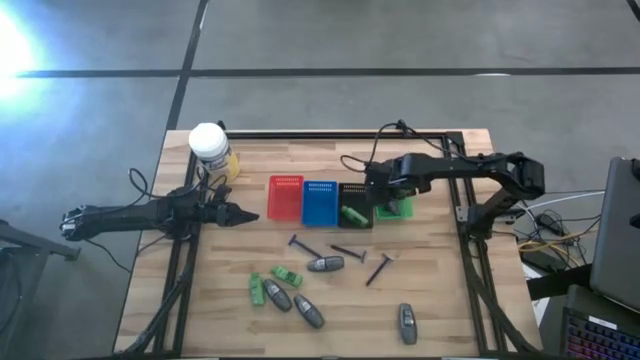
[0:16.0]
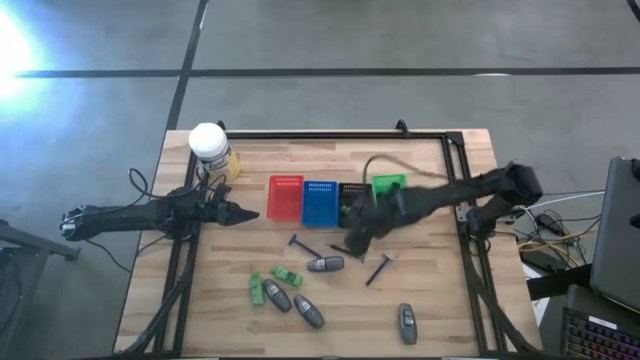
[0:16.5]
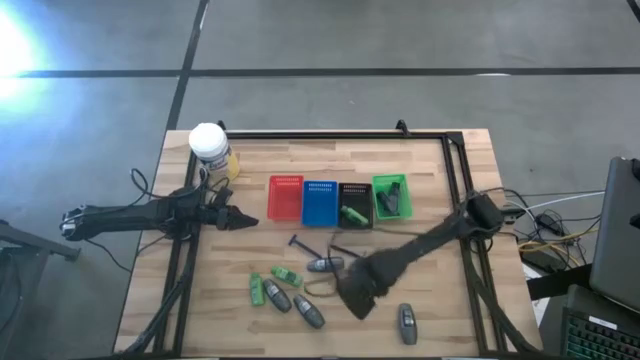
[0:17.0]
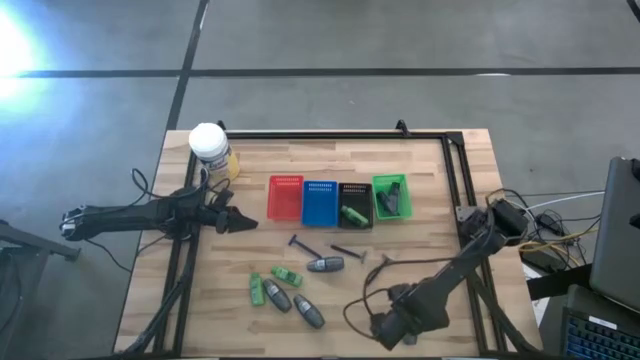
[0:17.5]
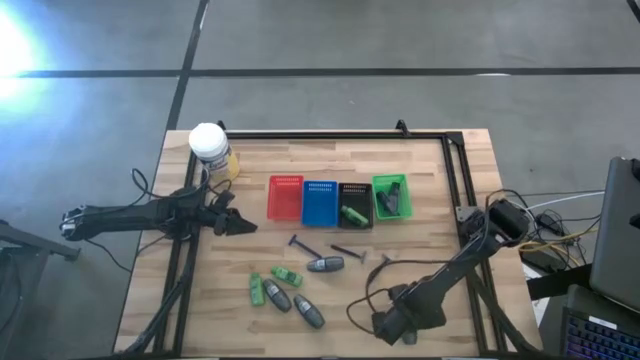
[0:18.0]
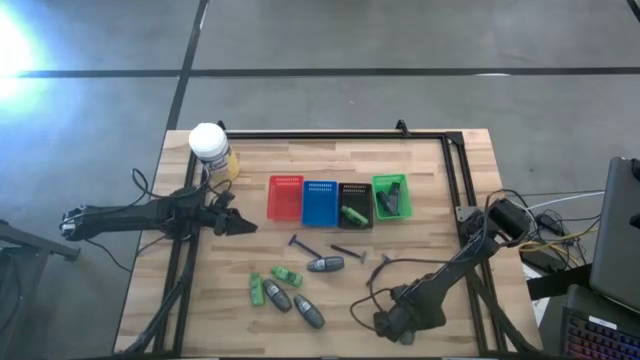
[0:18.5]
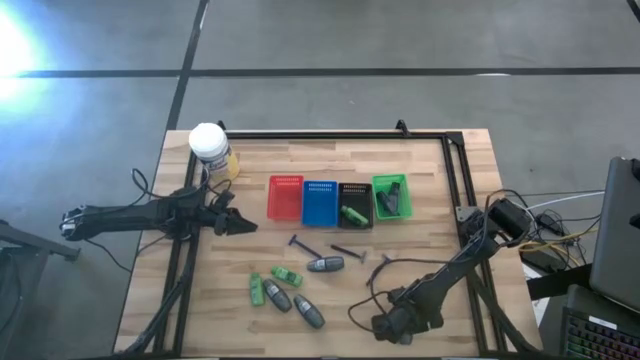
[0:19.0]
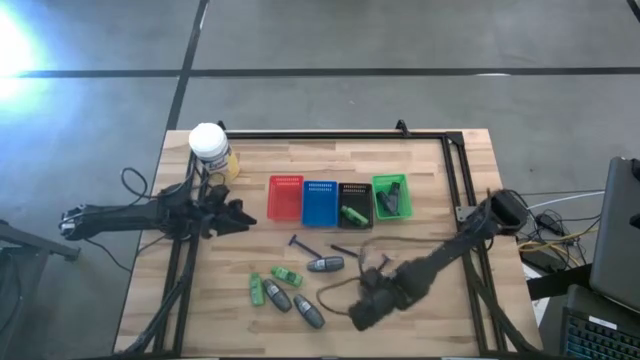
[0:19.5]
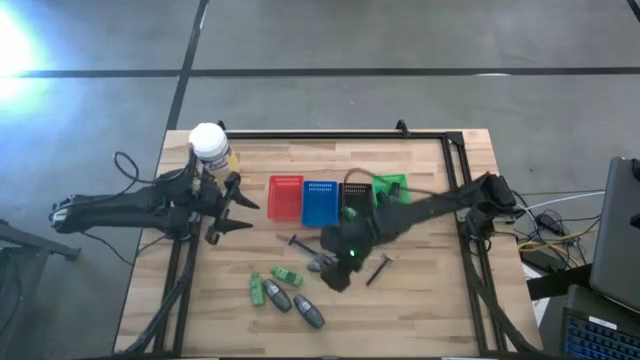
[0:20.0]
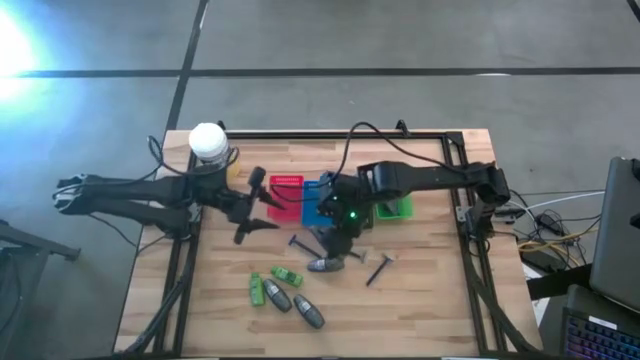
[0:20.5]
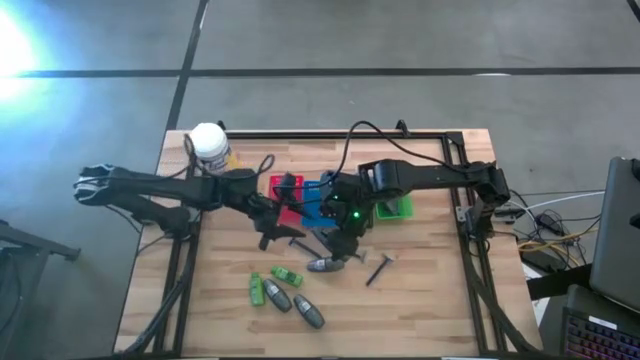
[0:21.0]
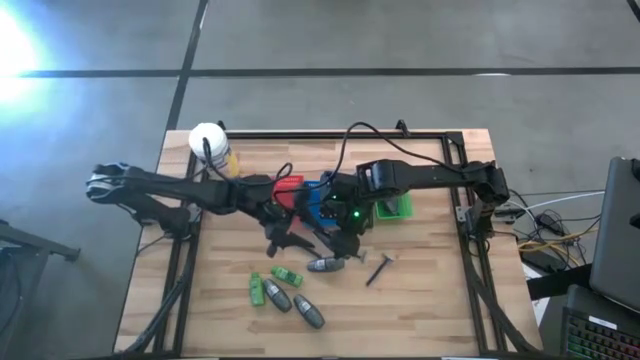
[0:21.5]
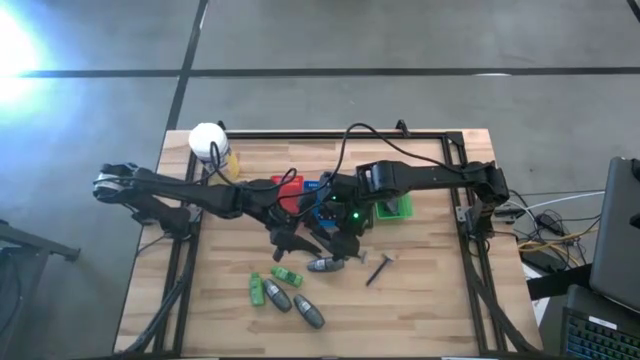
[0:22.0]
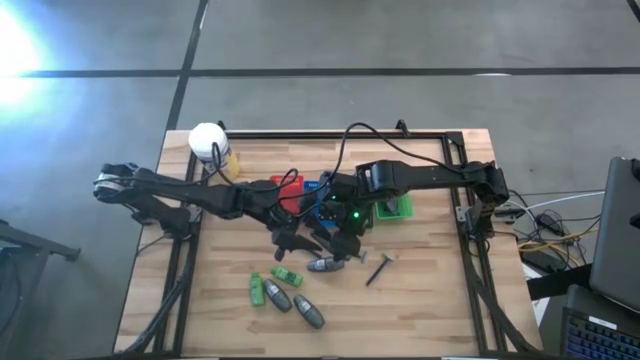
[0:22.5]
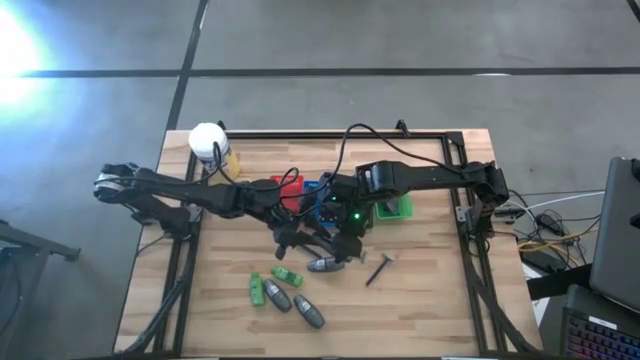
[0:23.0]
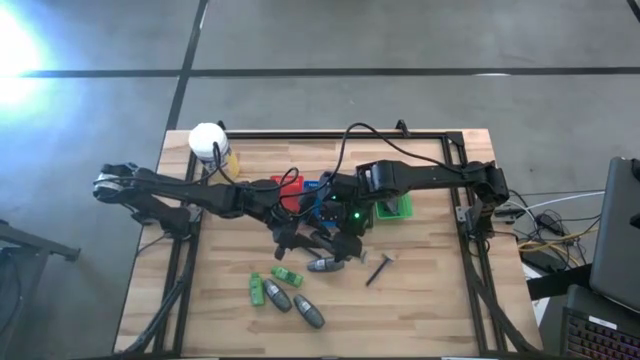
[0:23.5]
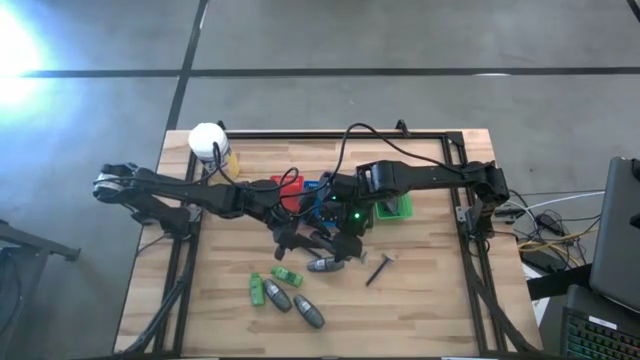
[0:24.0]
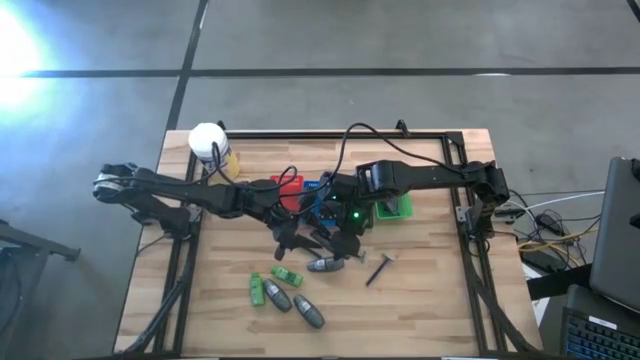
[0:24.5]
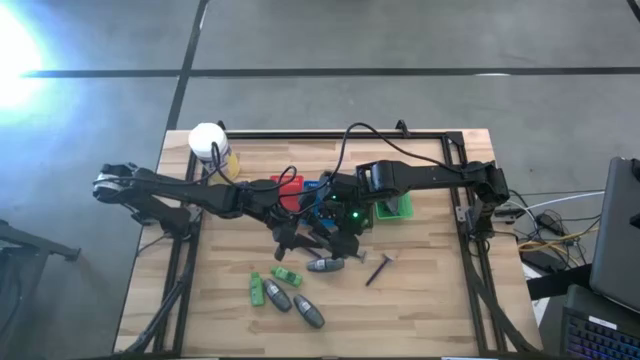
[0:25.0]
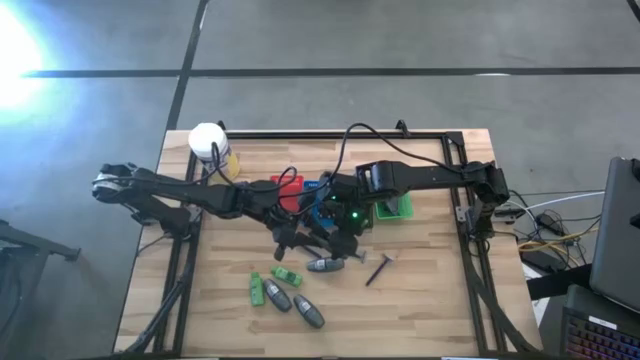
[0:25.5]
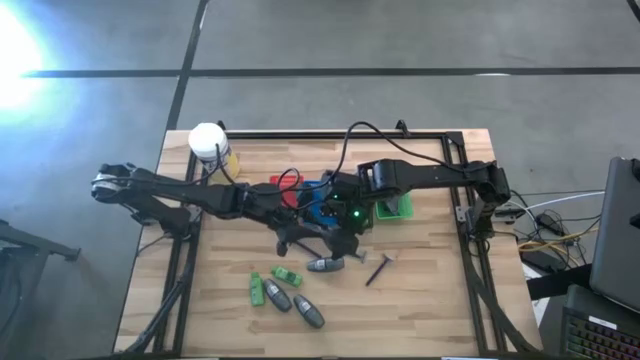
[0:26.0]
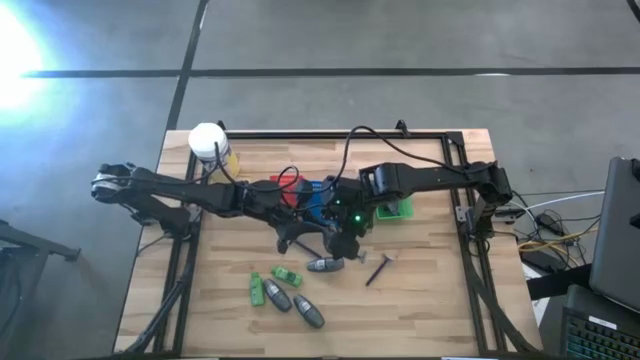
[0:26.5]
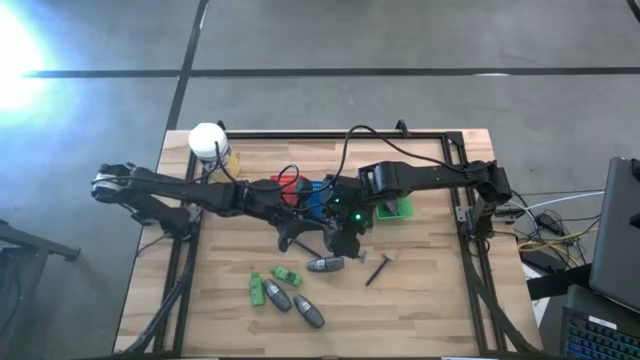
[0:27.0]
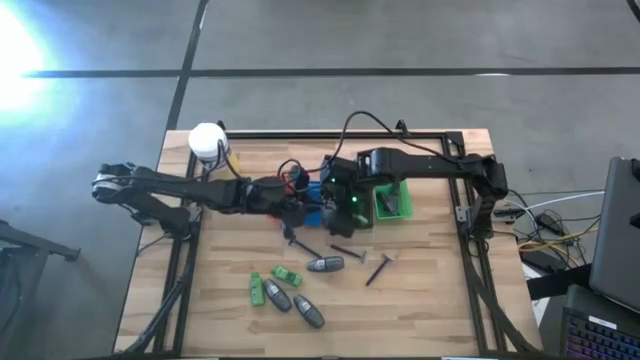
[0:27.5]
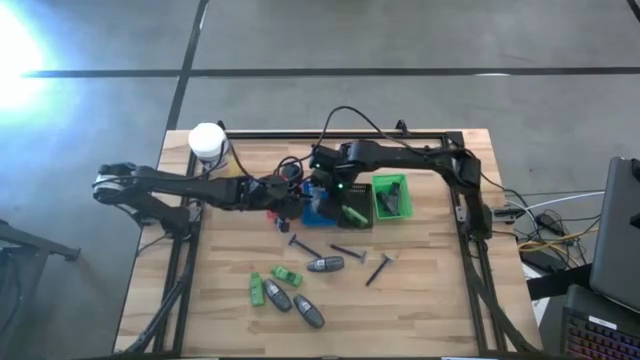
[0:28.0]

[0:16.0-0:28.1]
Task: Pick & Place Travel size toiletries
Put the black deodorant into the blue basket

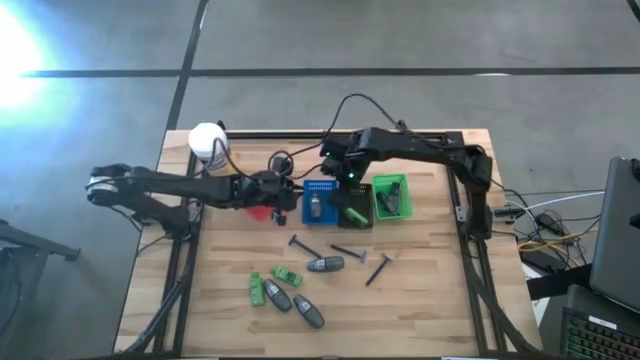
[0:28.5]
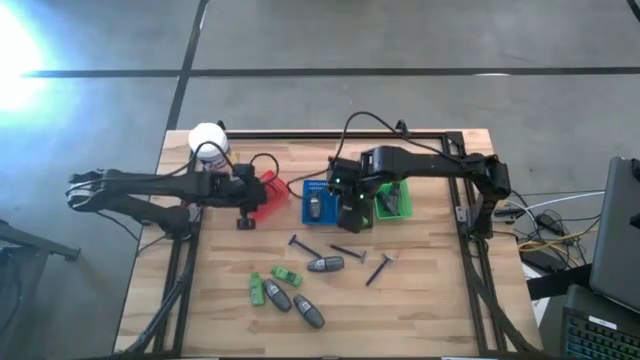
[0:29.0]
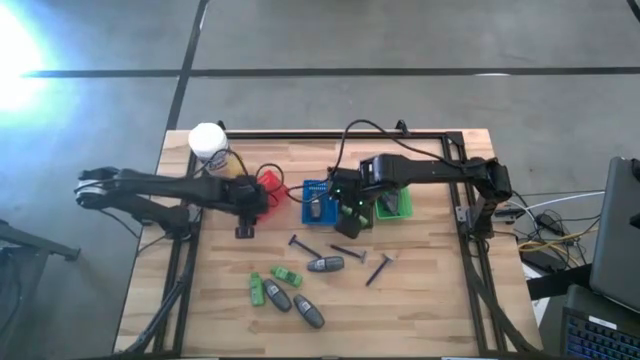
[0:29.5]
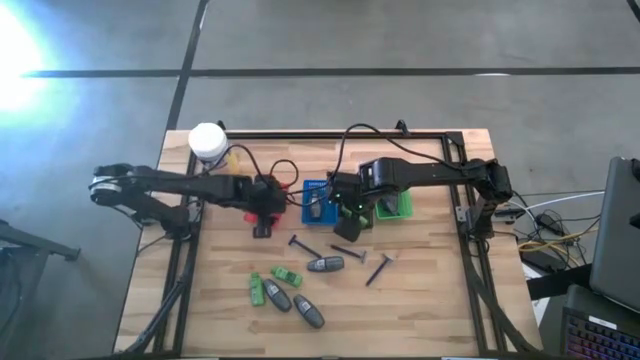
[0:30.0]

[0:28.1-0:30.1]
Adjust the red basket

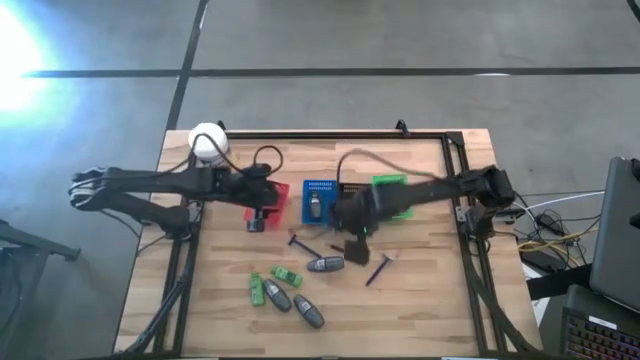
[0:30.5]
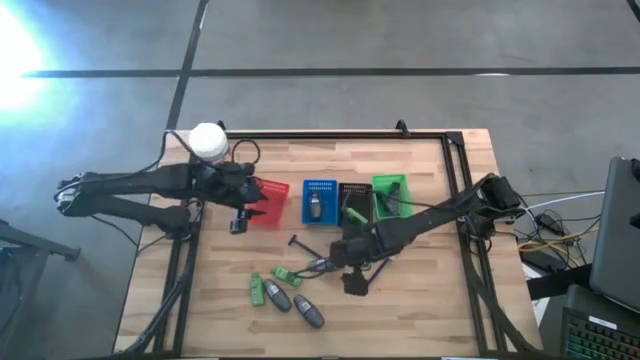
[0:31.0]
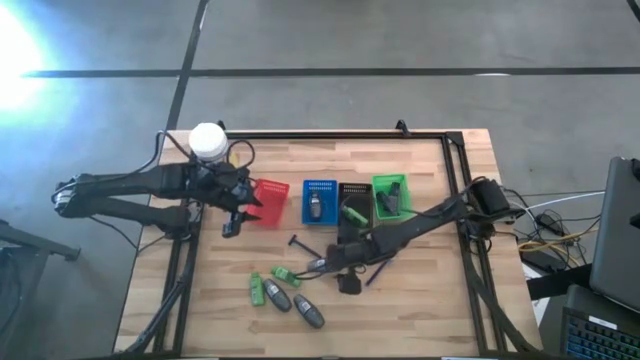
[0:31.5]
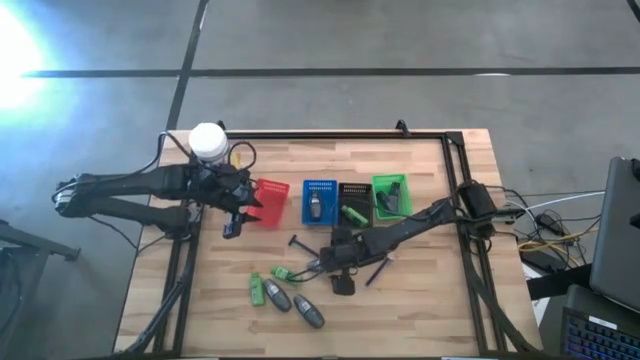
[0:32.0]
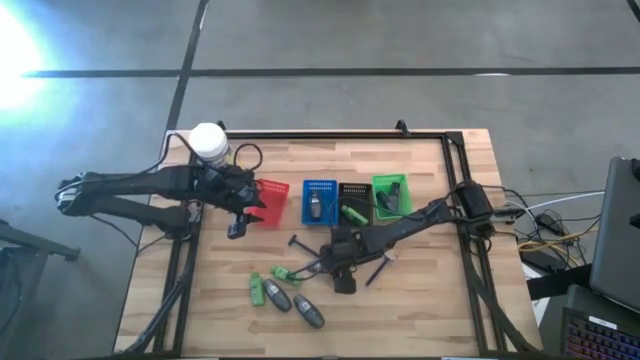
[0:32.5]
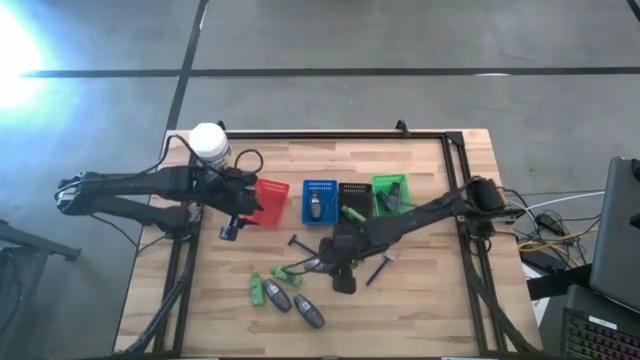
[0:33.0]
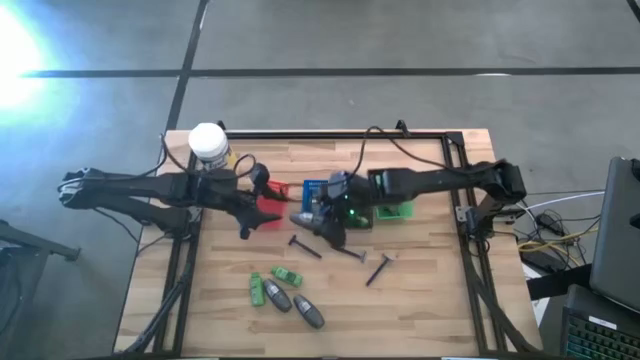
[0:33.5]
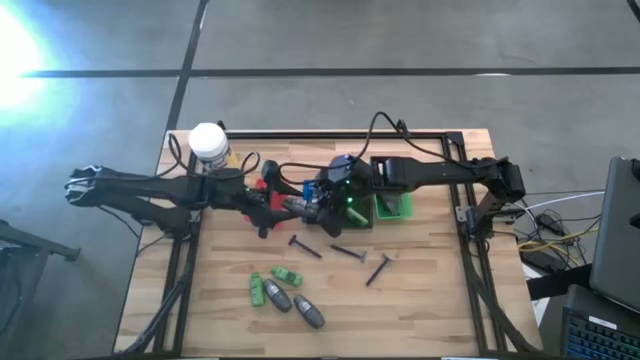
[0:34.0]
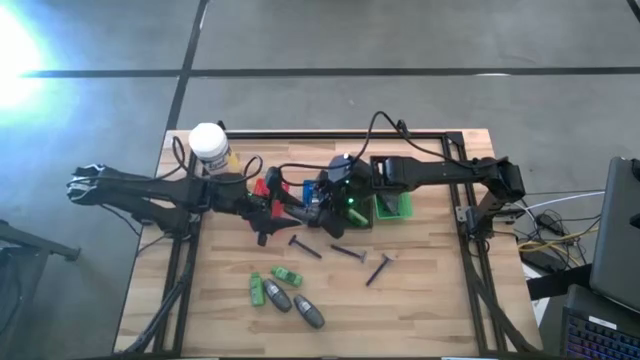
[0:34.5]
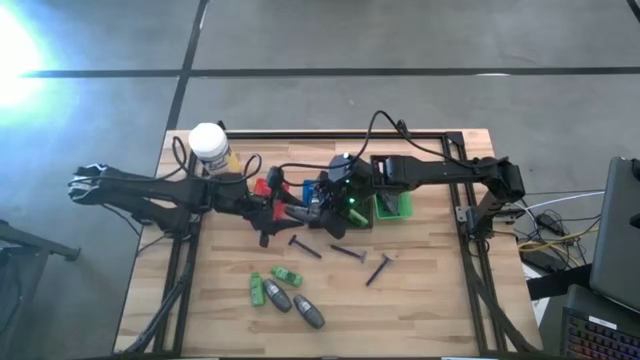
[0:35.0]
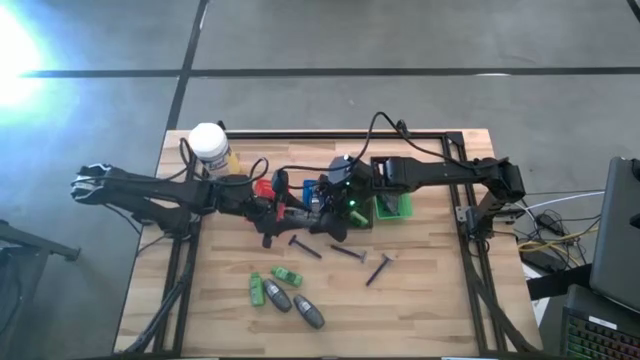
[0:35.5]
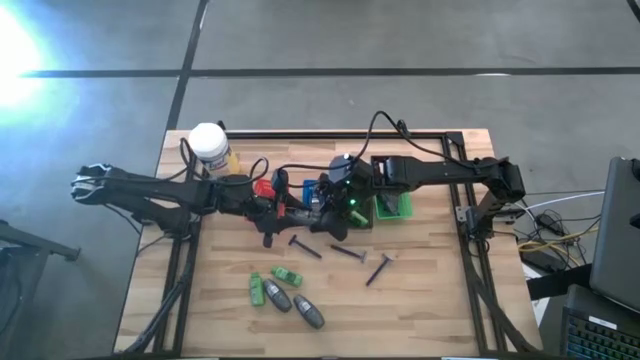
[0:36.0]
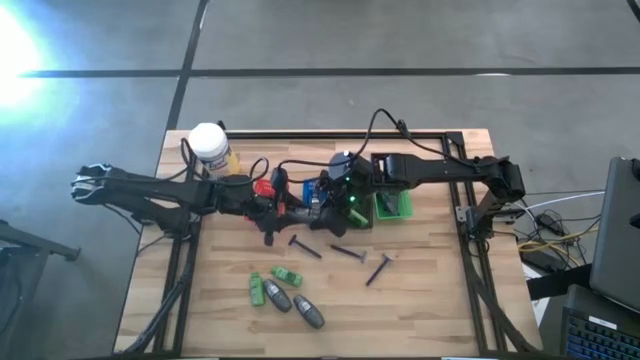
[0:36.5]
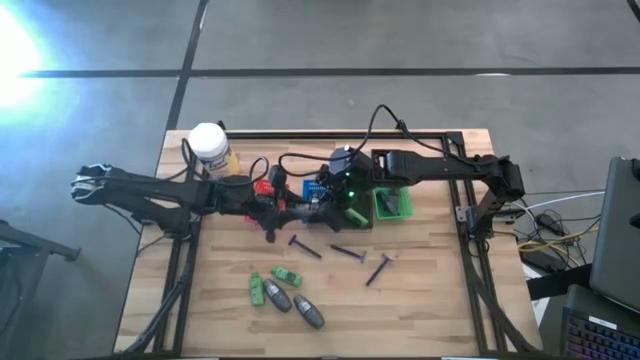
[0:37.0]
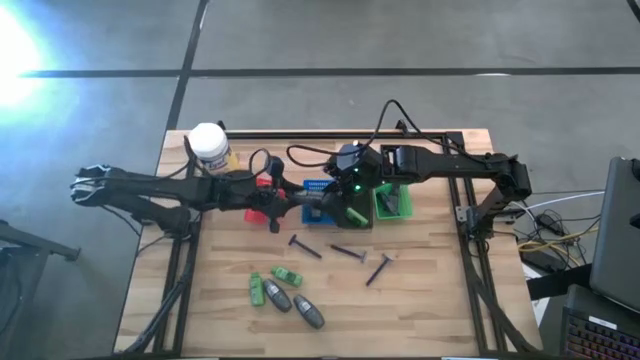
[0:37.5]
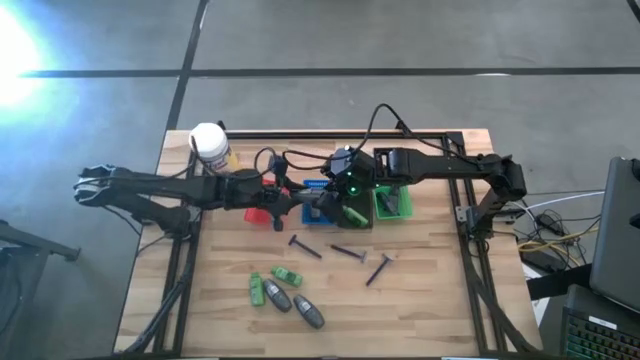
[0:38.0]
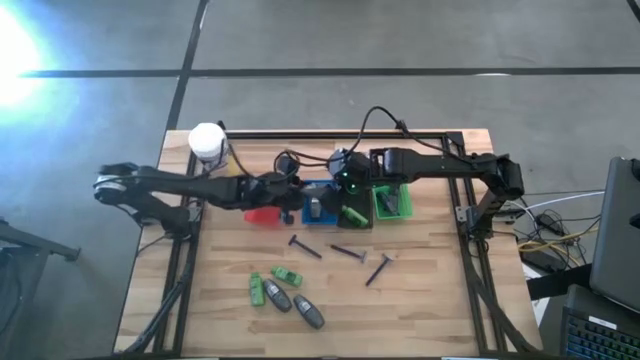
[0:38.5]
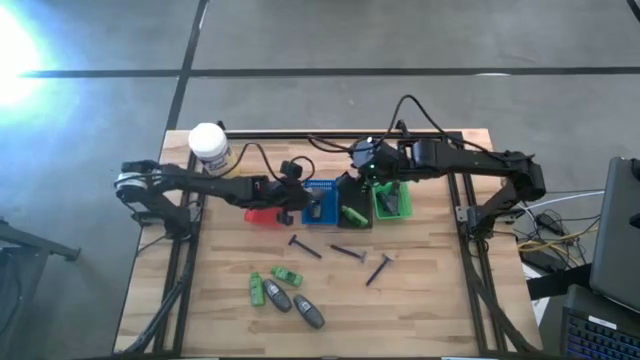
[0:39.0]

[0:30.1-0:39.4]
Put the black deodorant into the blue basket
